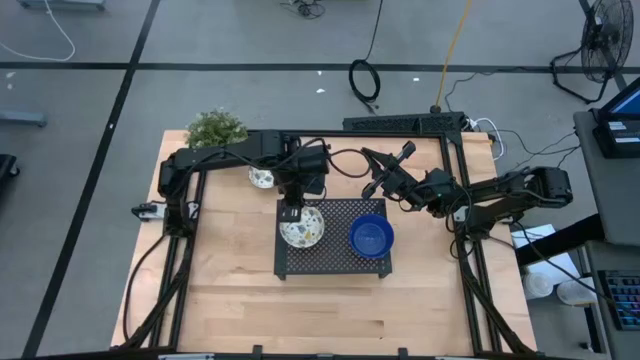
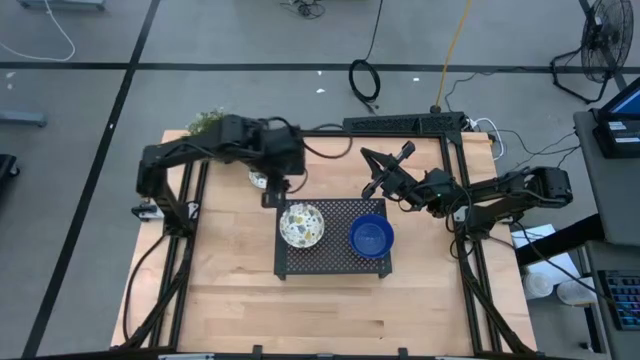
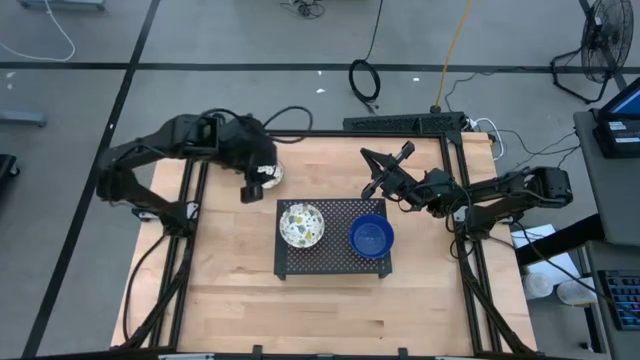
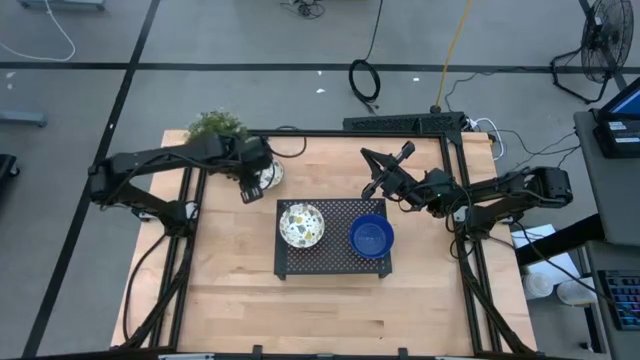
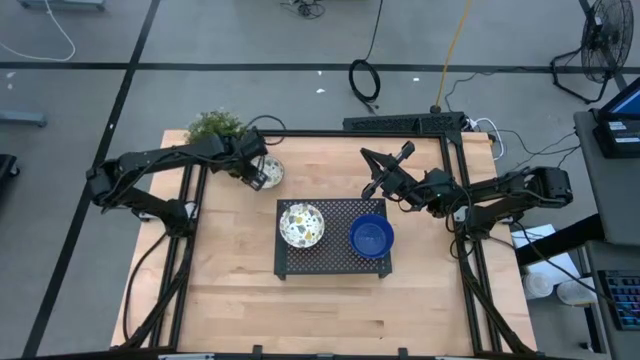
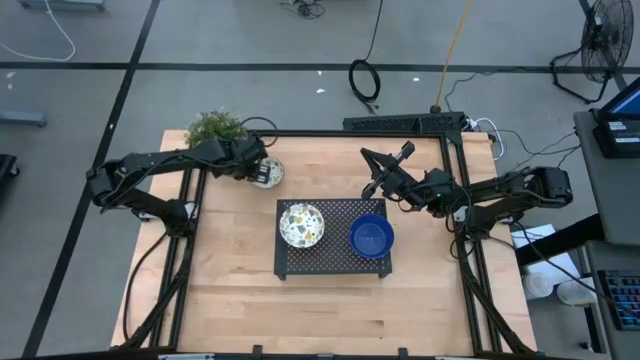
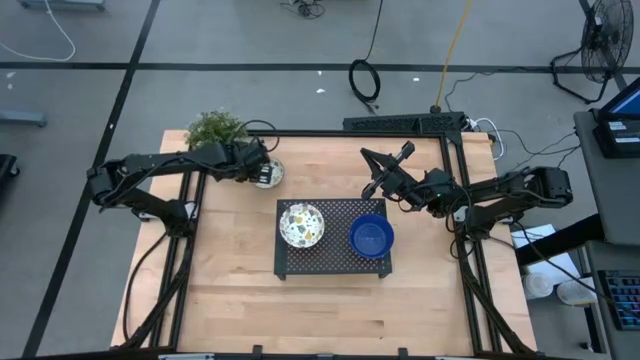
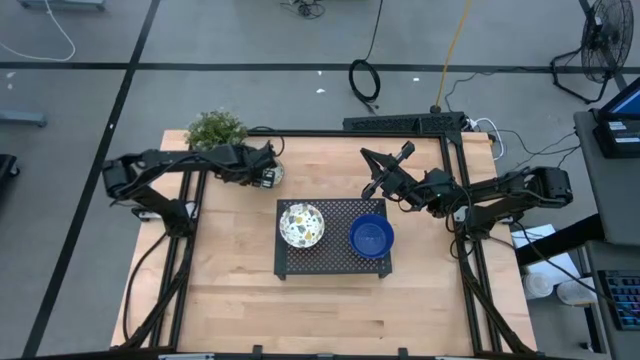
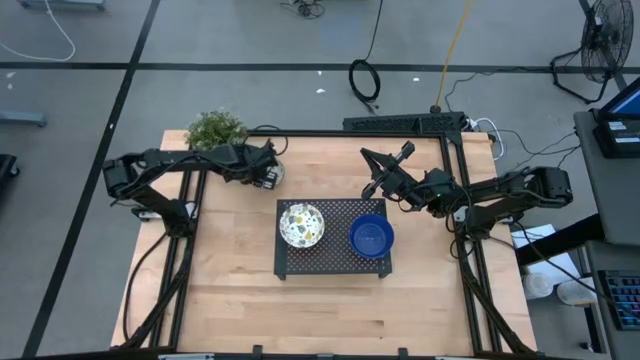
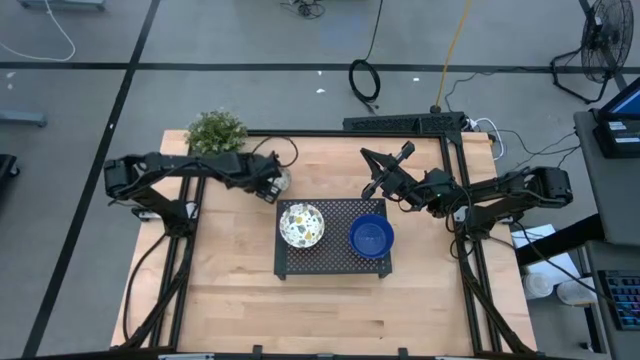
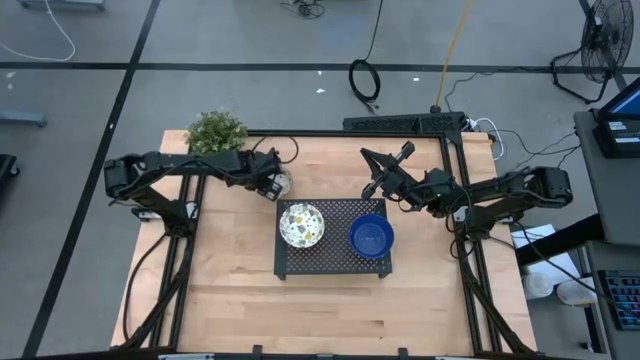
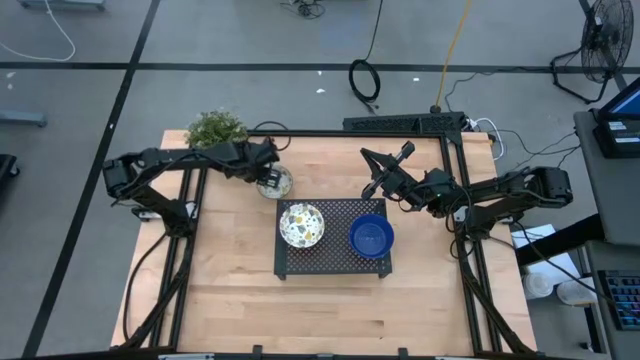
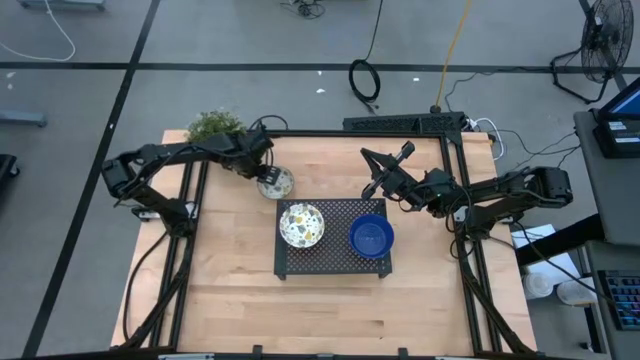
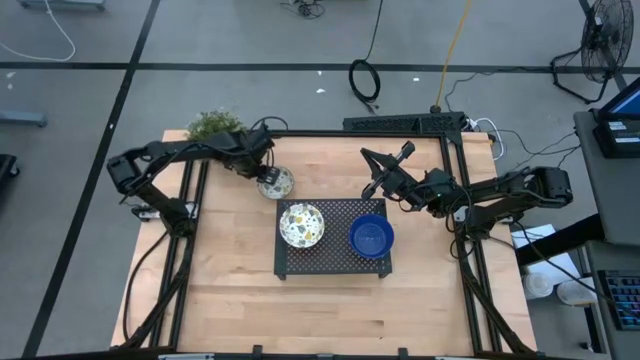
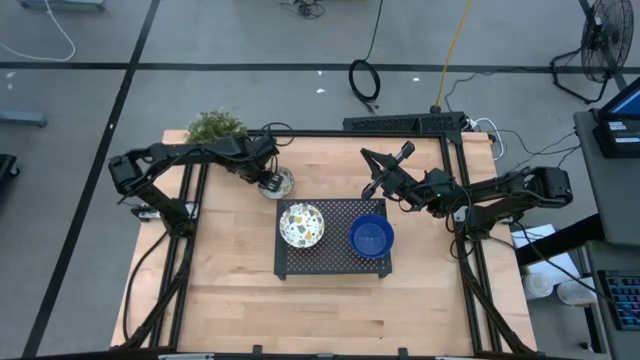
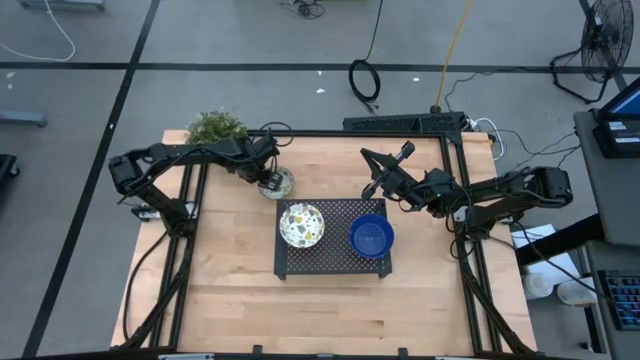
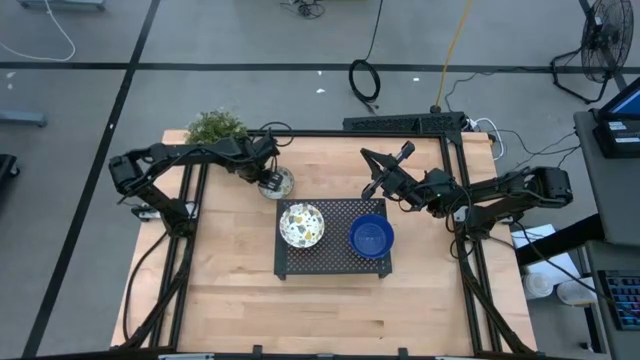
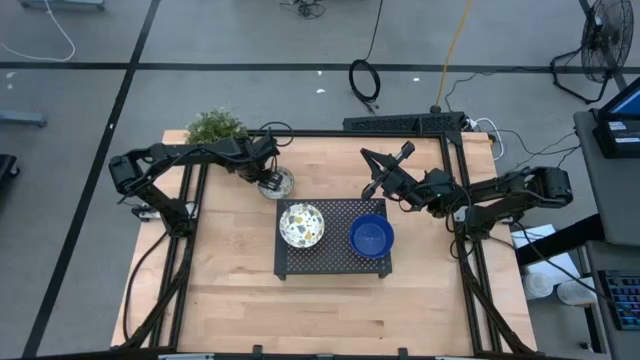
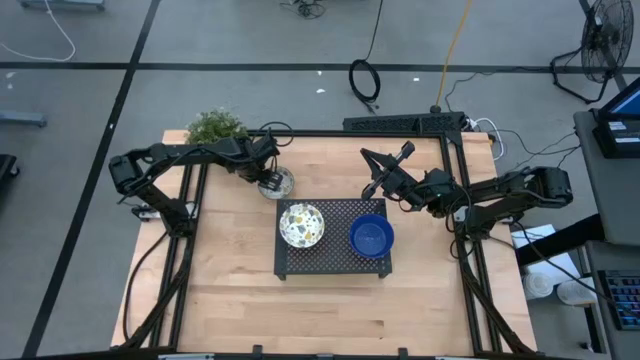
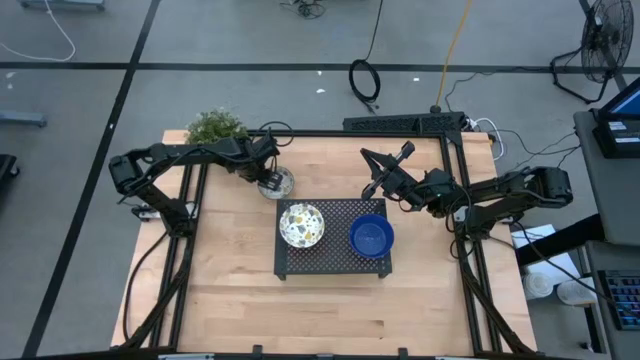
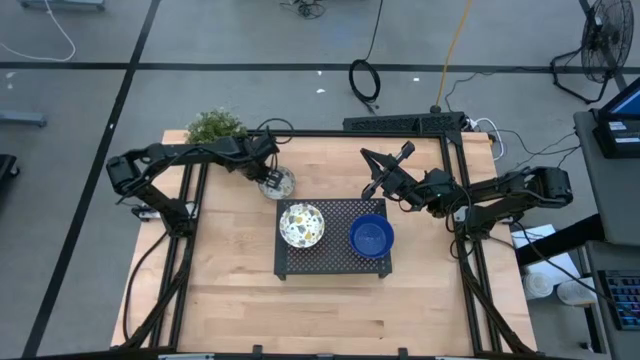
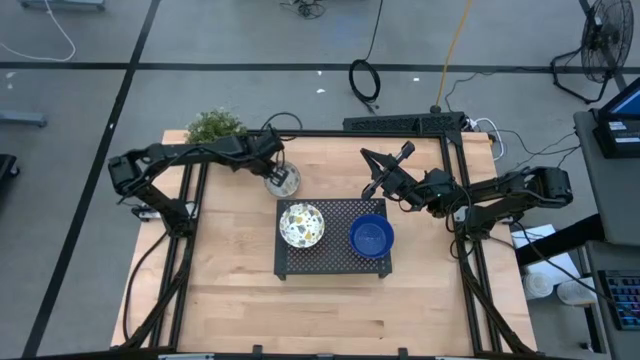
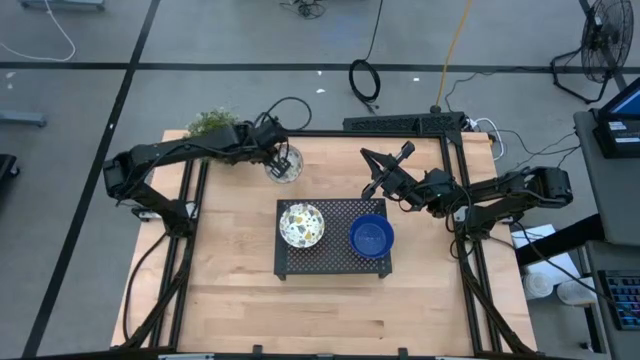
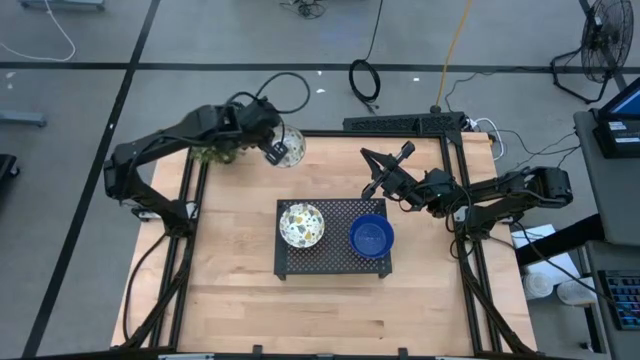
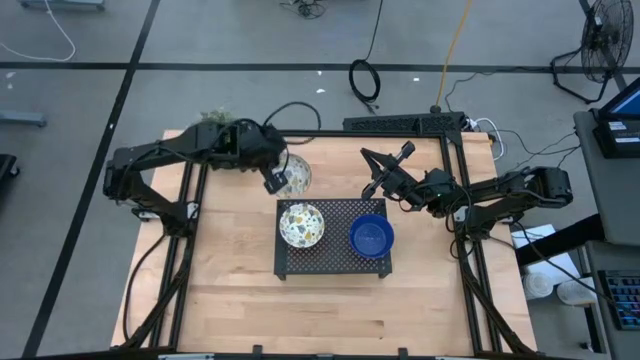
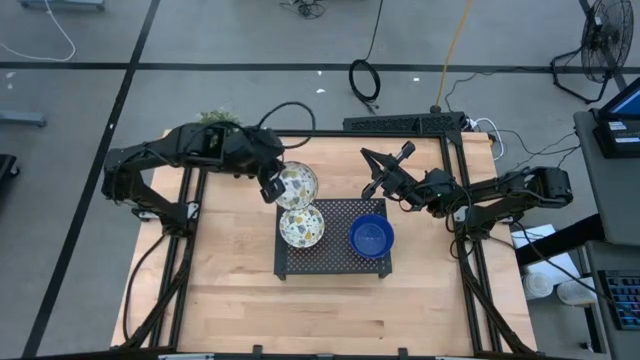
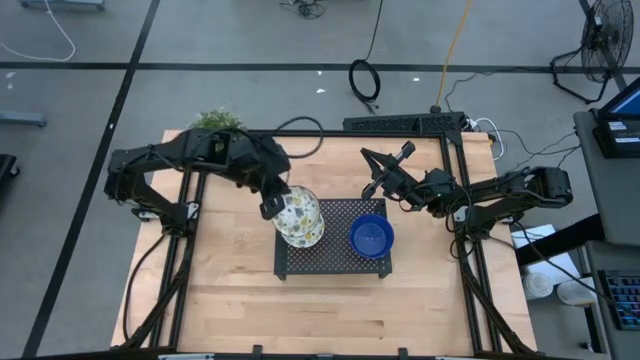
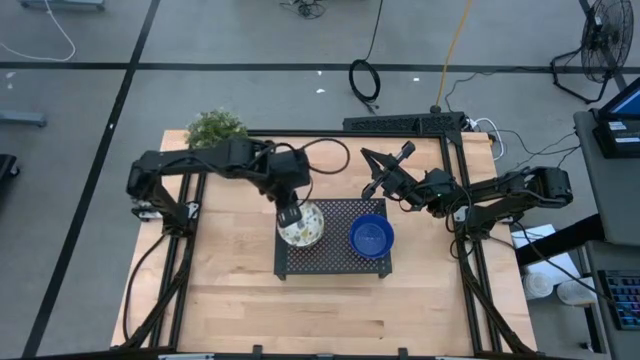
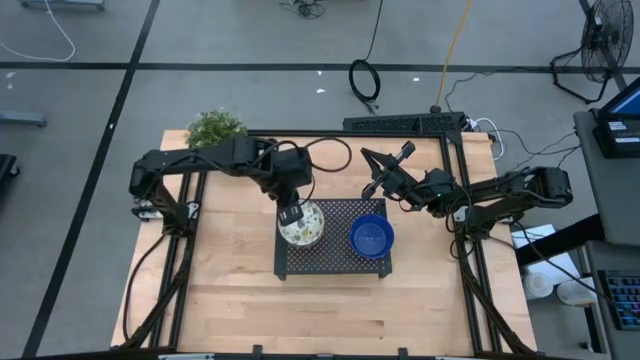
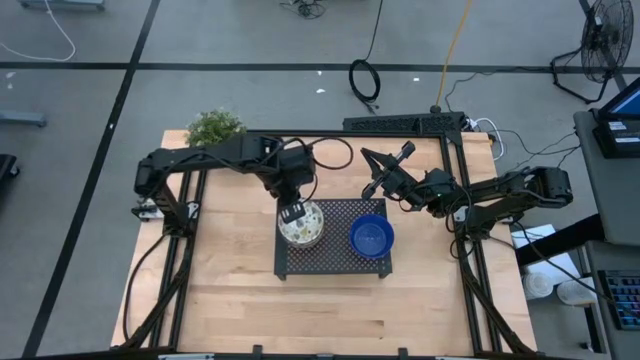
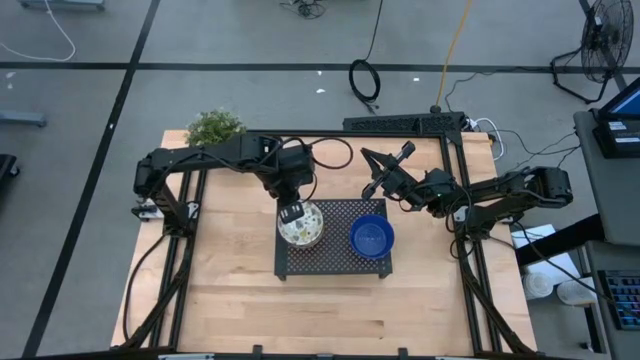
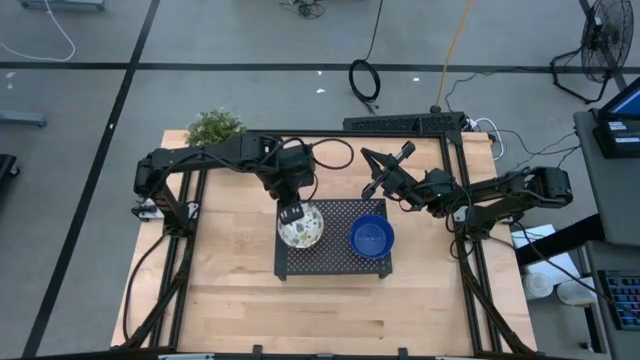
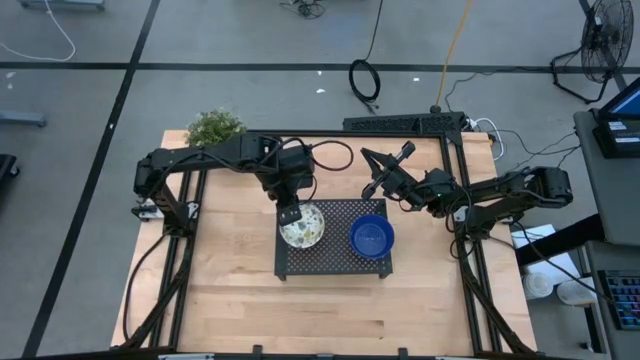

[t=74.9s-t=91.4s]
Task: Pick & Place Mini bowls
Stack the white bowl on the stacked white bowls on the shelf

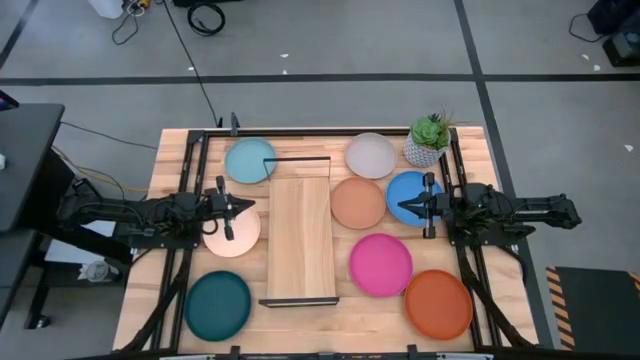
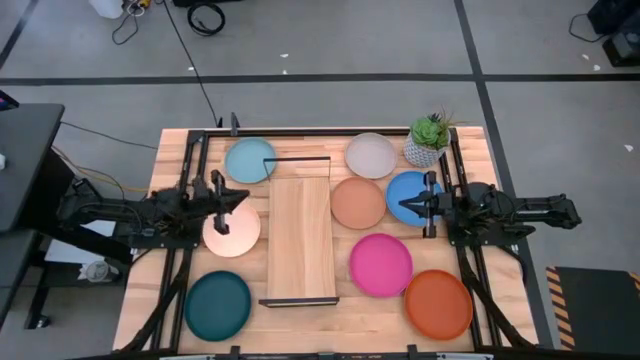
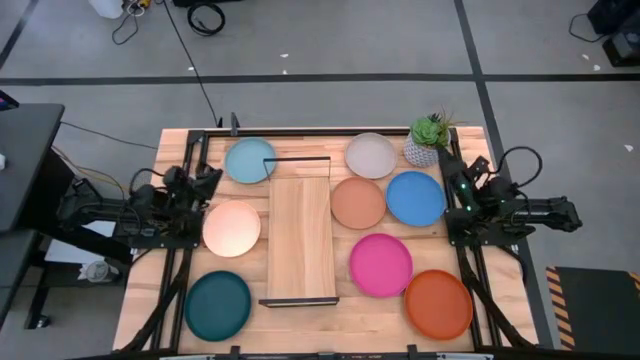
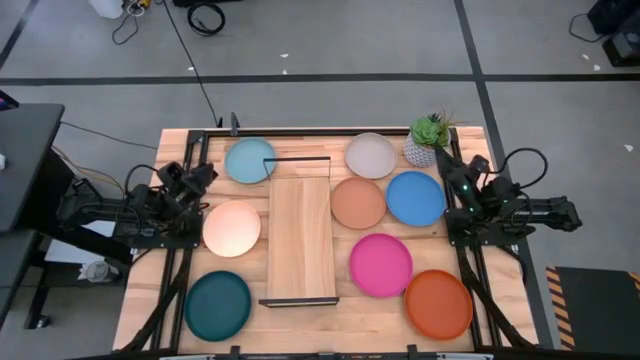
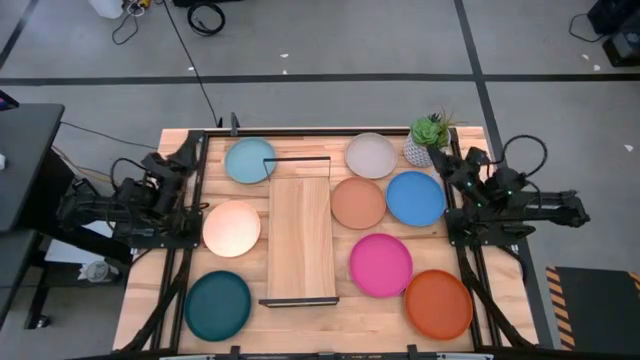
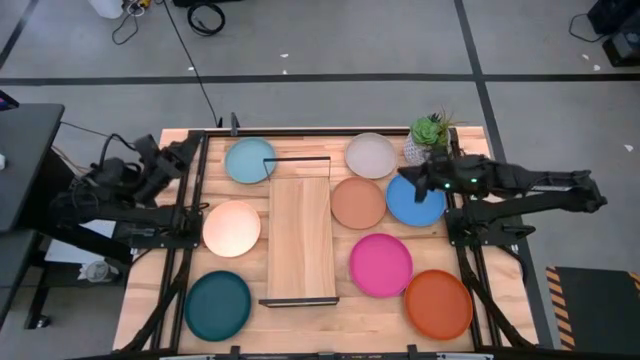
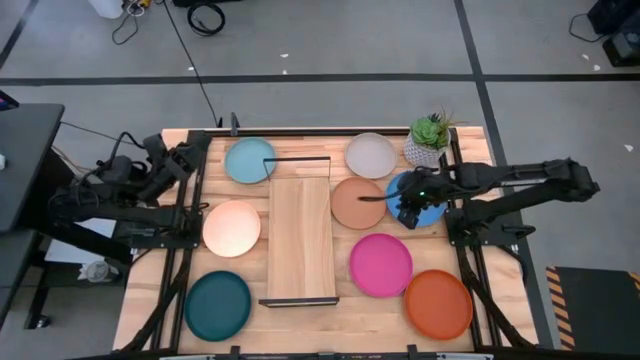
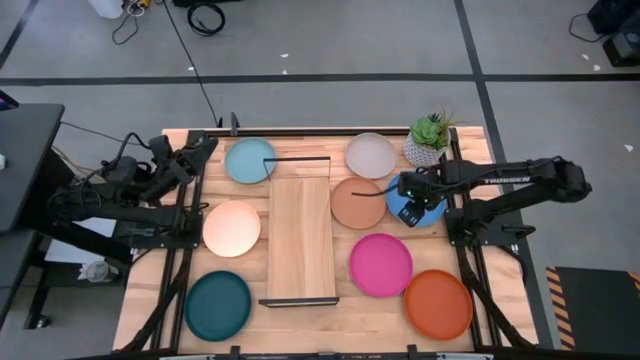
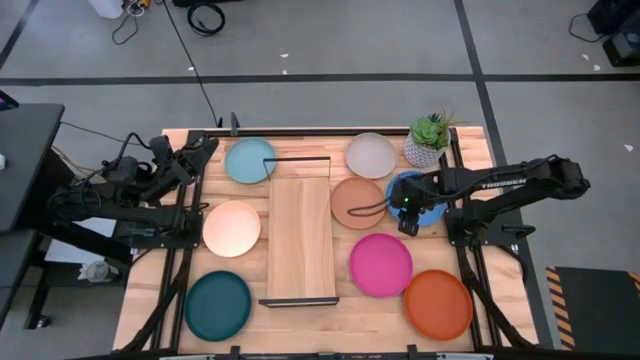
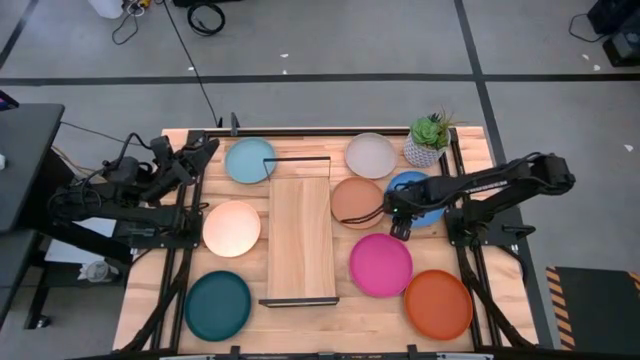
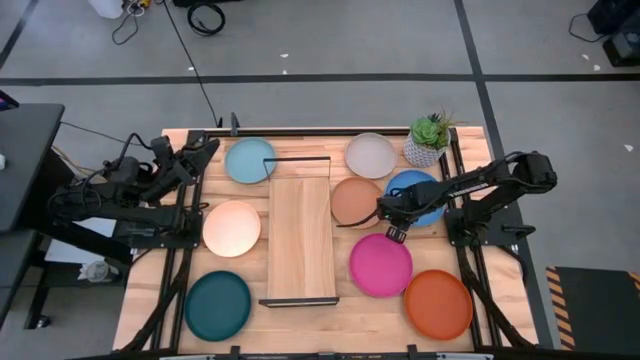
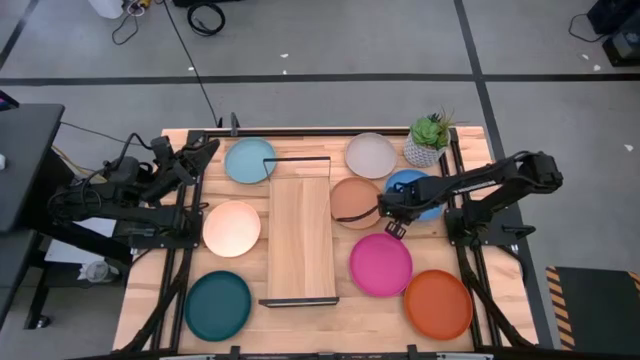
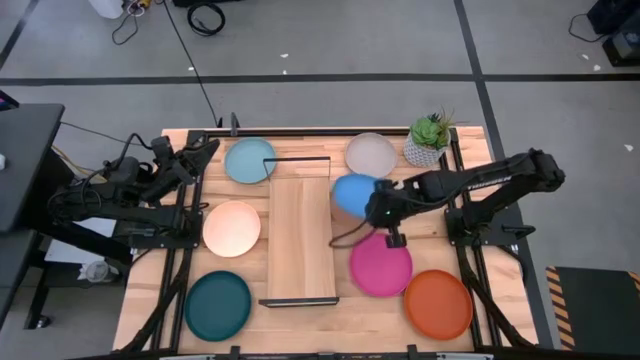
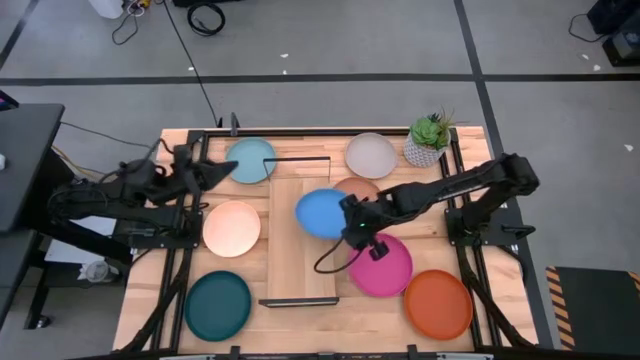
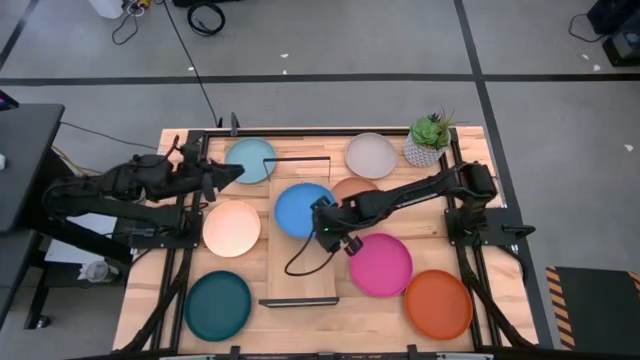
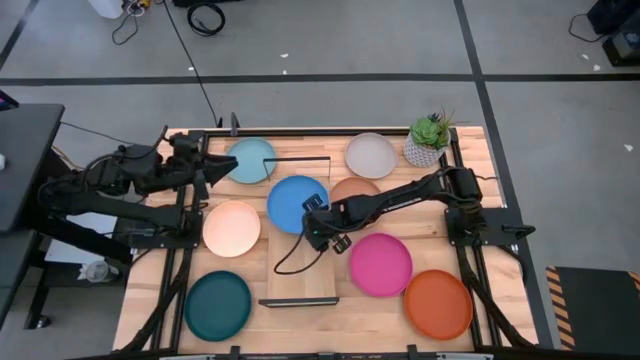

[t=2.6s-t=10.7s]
Task: Place and stack plates onto a shelf
Put the blue plate on the shelf
